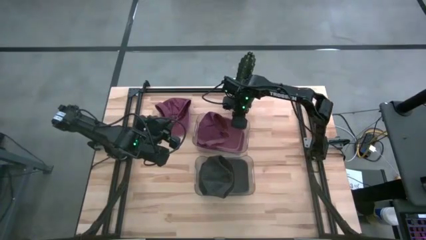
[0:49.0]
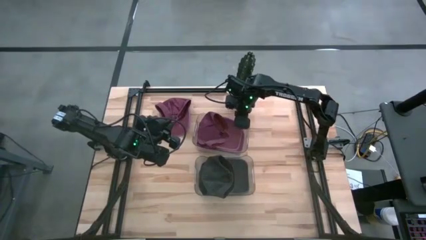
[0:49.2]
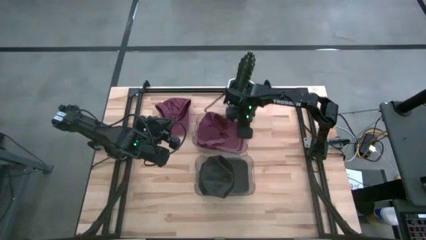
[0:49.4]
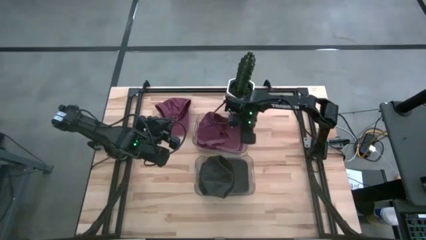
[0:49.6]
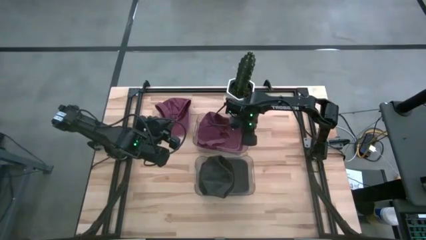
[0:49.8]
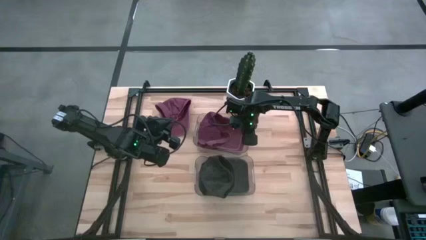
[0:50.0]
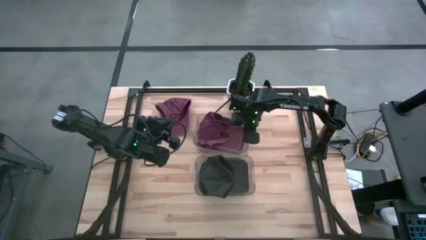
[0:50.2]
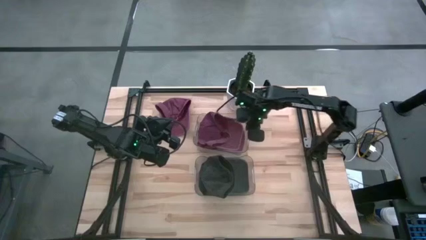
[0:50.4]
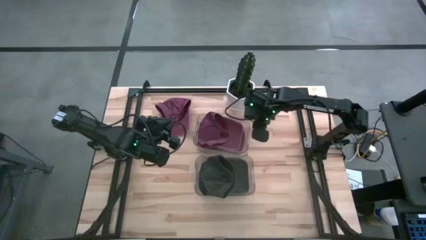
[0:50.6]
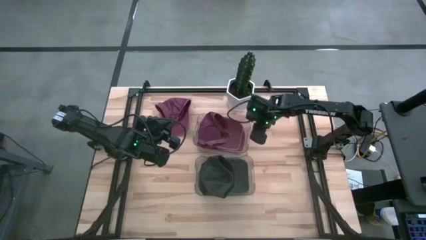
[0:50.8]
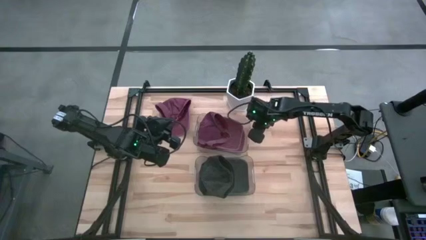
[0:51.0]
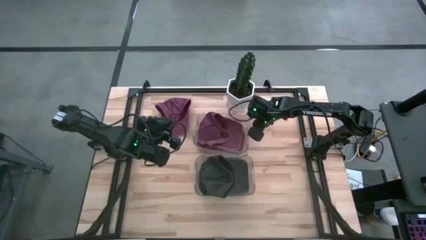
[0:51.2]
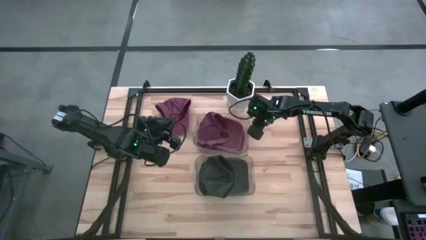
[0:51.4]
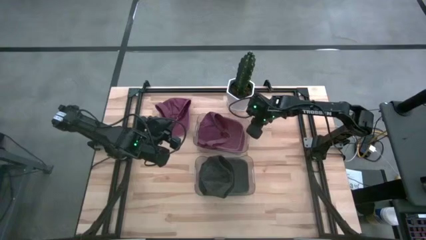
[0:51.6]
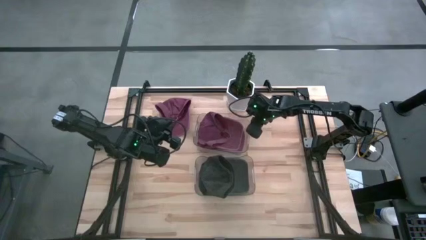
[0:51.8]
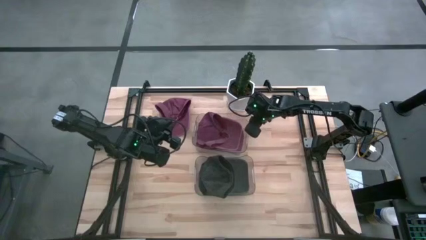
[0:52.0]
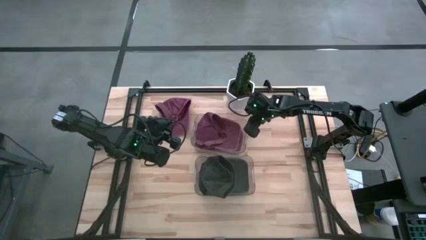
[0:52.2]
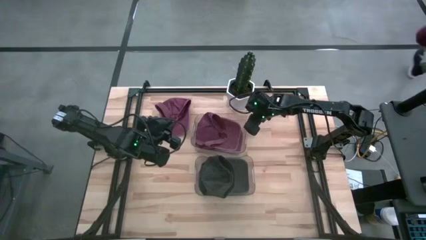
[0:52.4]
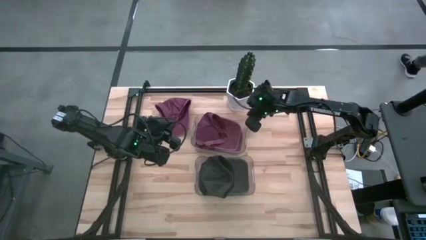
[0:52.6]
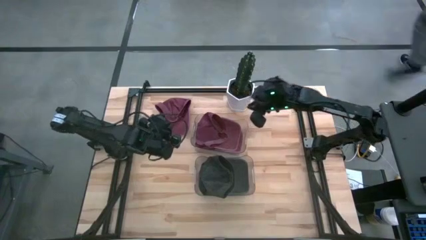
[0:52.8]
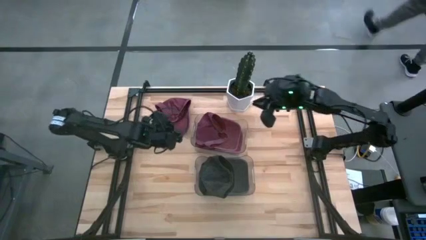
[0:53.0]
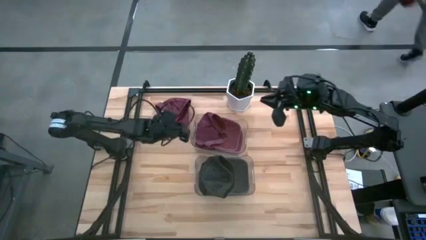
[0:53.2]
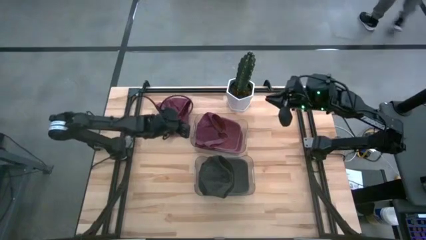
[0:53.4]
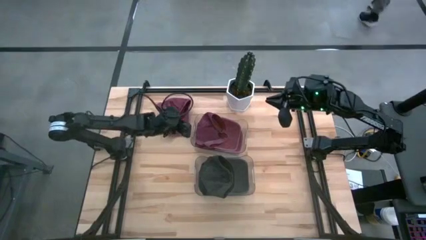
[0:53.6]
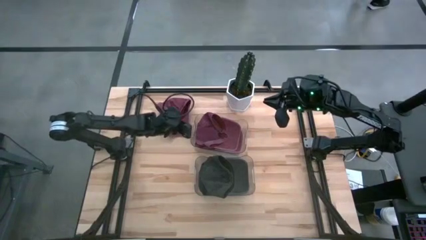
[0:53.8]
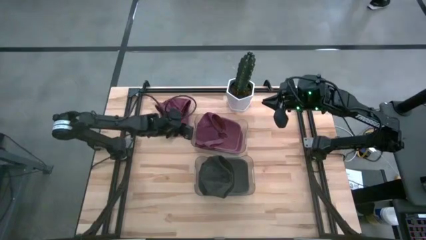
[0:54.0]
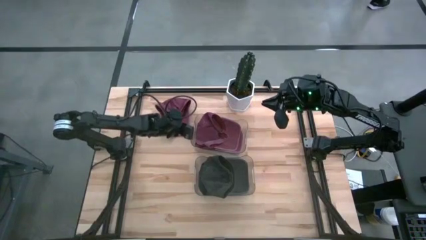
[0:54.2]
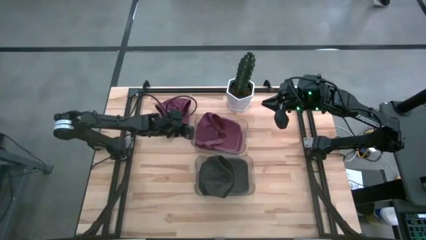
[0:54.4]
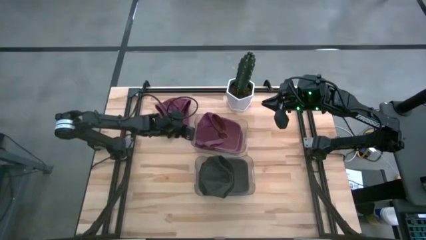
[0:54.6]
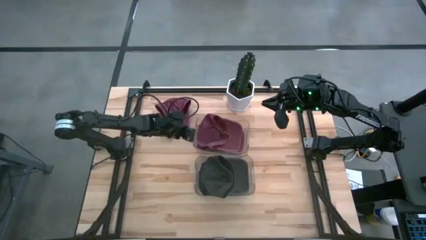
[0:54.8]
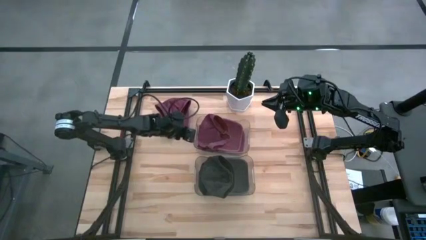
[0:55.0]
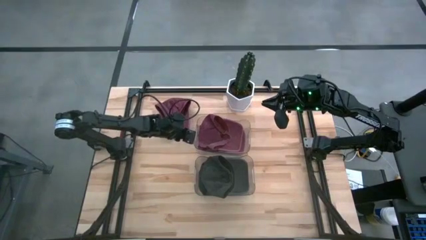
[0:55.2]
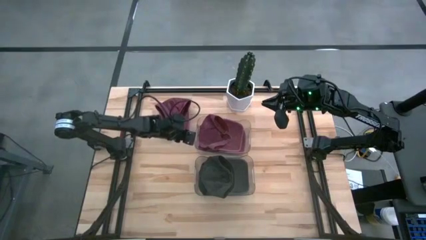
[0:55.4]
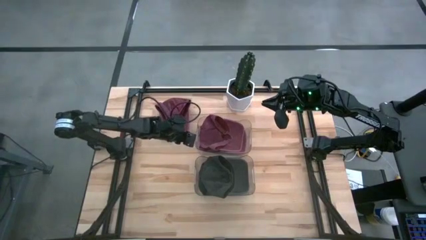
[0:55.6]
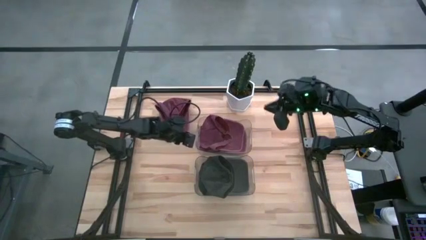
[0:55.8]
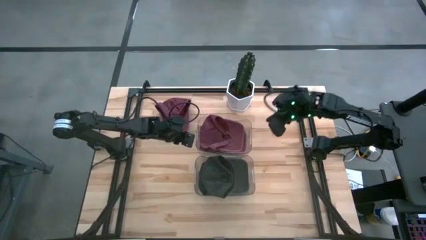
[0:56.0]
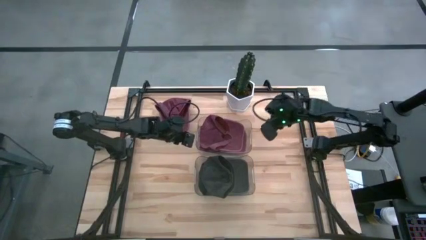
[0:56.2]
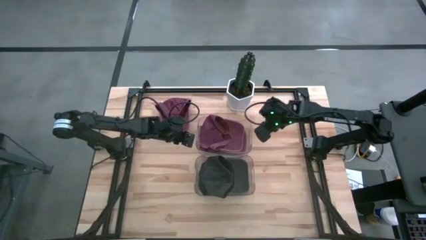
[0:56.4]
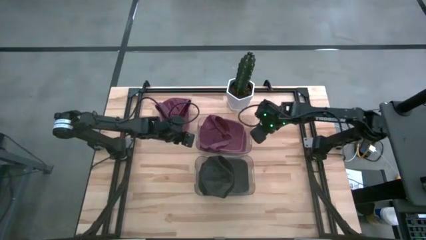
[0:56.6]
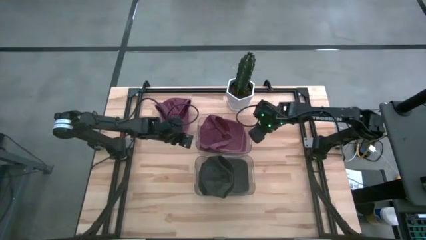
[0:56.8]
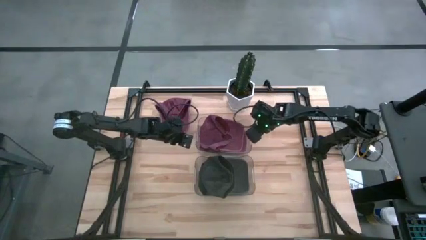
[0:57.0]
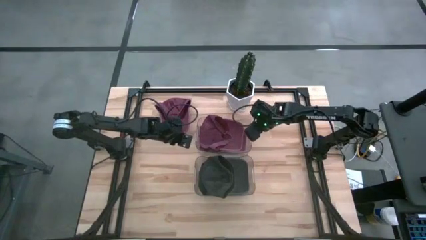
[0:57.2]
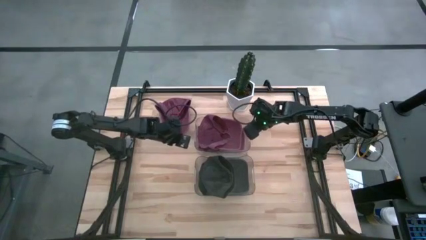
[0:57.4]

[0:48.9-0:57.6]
Task: Pick & Place hat
Adjust the top transparent bin

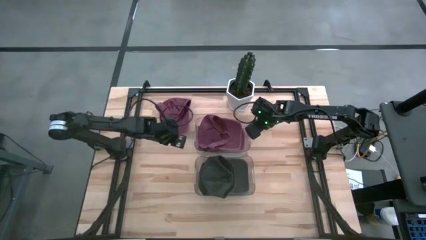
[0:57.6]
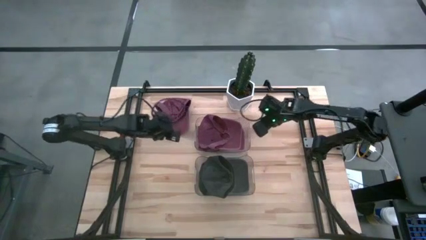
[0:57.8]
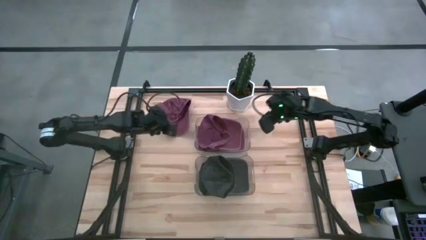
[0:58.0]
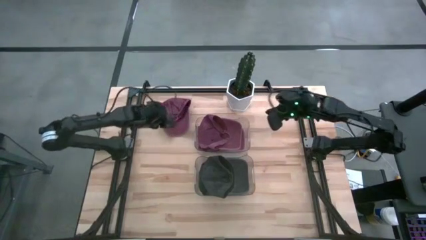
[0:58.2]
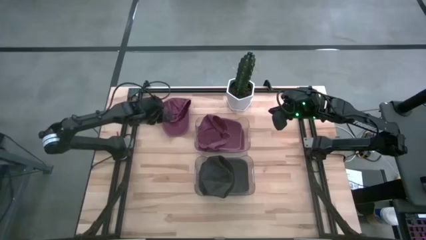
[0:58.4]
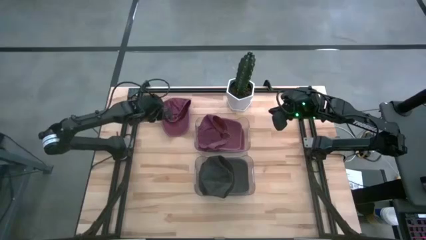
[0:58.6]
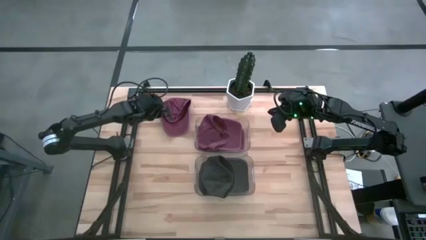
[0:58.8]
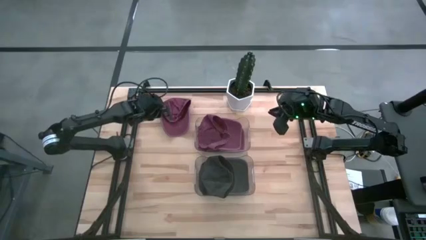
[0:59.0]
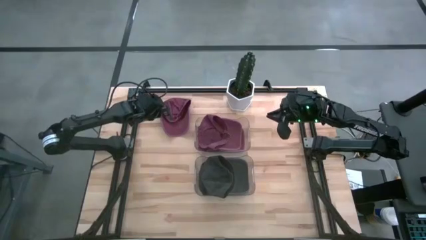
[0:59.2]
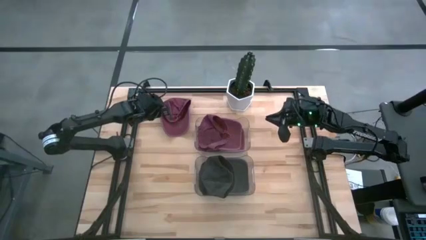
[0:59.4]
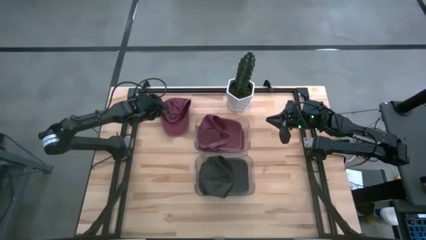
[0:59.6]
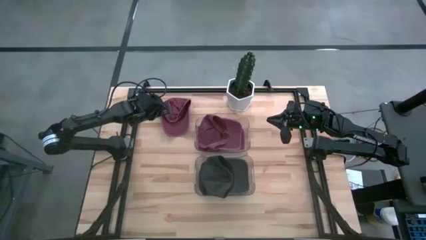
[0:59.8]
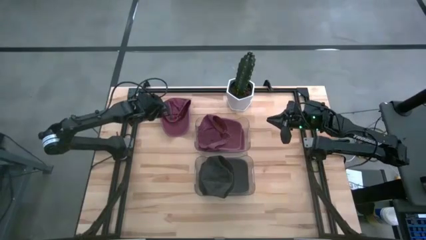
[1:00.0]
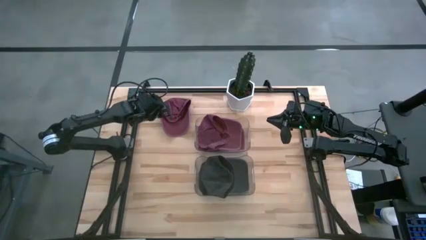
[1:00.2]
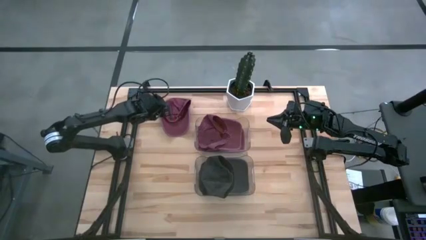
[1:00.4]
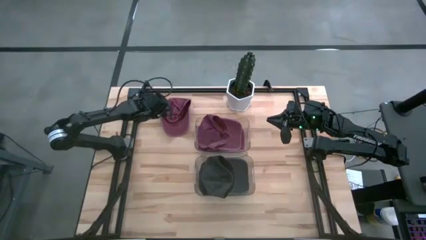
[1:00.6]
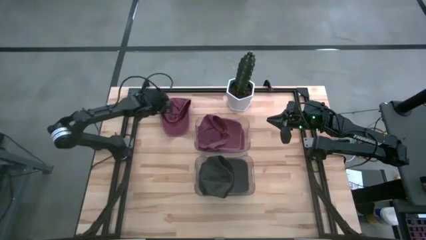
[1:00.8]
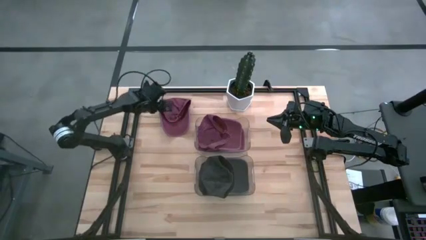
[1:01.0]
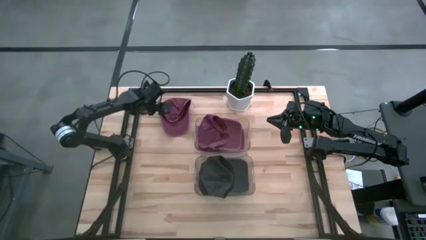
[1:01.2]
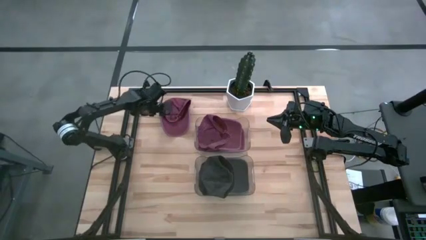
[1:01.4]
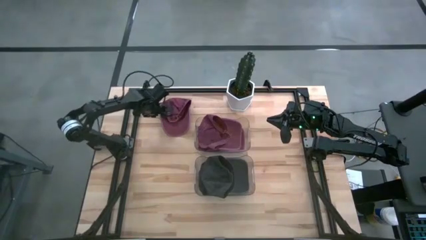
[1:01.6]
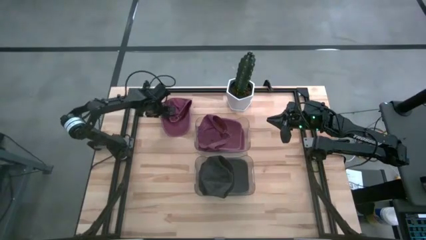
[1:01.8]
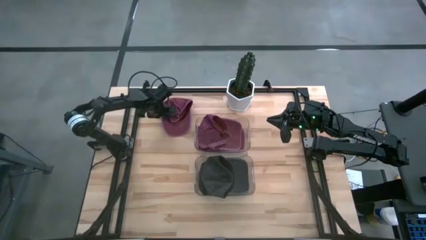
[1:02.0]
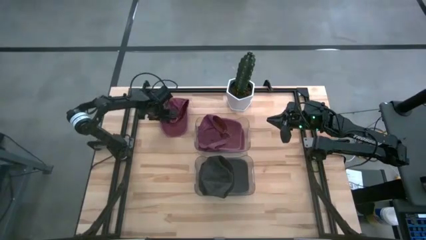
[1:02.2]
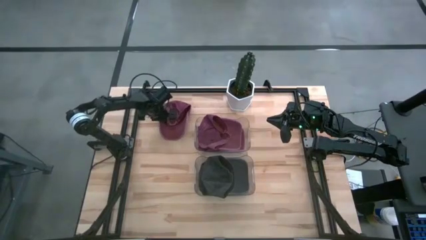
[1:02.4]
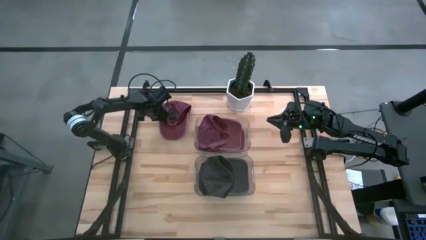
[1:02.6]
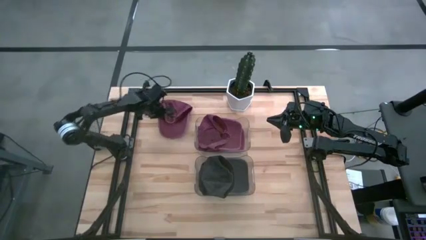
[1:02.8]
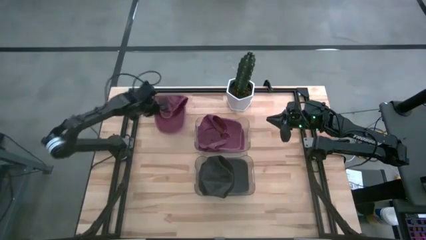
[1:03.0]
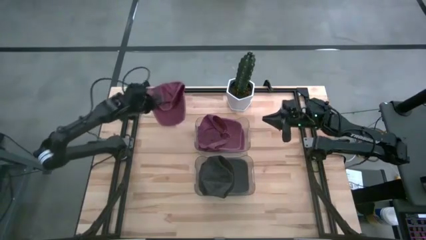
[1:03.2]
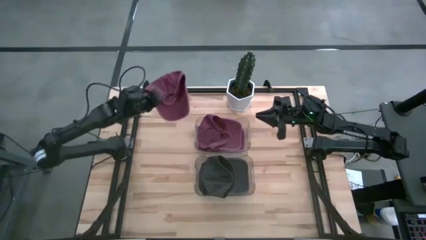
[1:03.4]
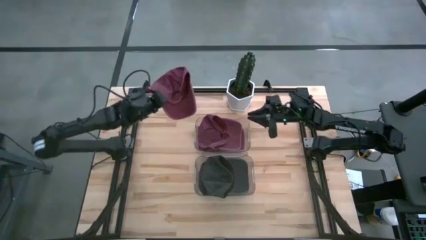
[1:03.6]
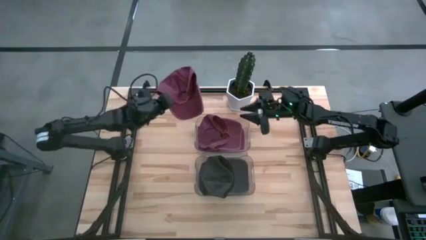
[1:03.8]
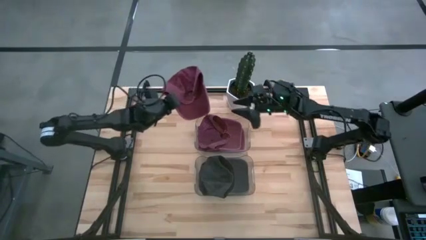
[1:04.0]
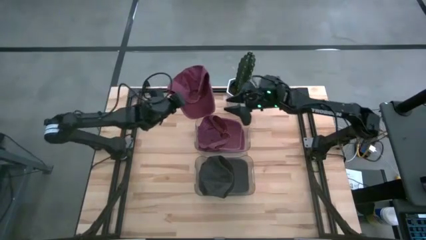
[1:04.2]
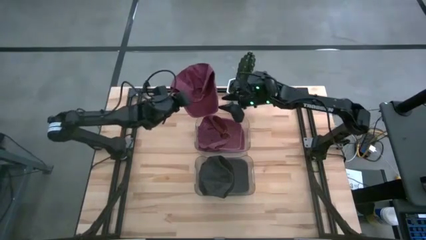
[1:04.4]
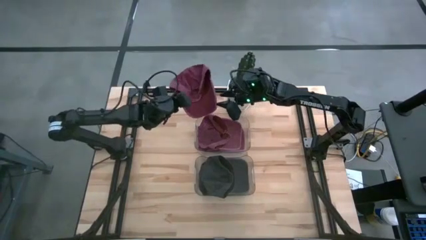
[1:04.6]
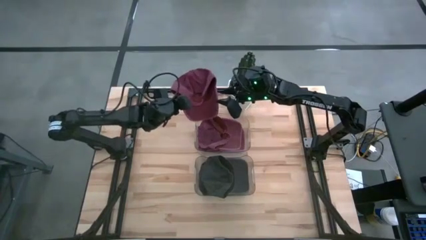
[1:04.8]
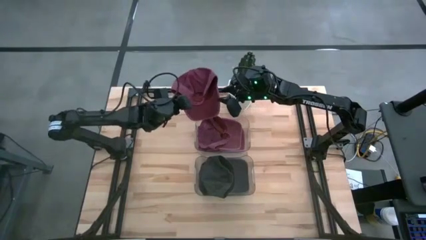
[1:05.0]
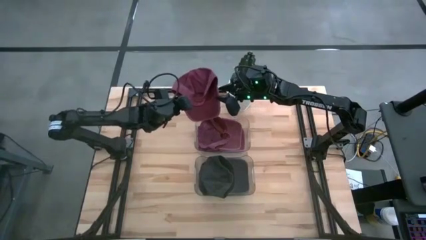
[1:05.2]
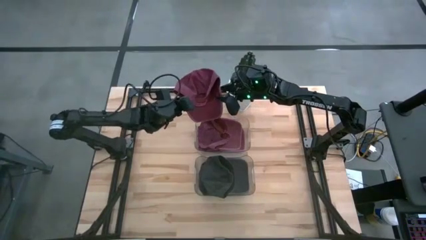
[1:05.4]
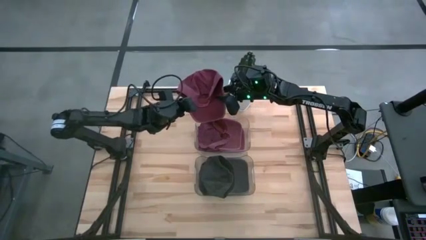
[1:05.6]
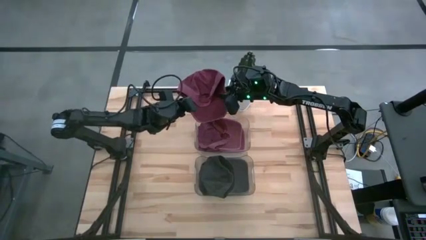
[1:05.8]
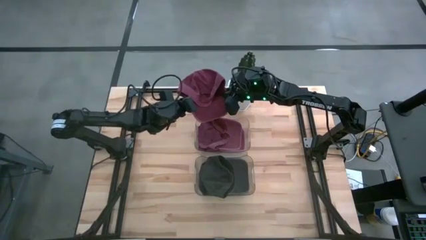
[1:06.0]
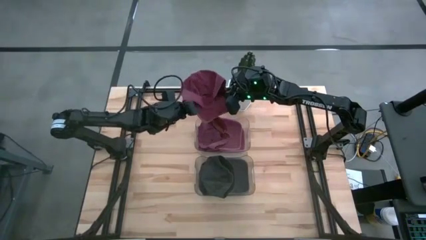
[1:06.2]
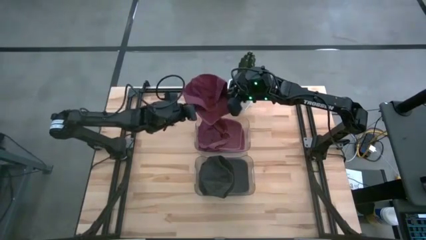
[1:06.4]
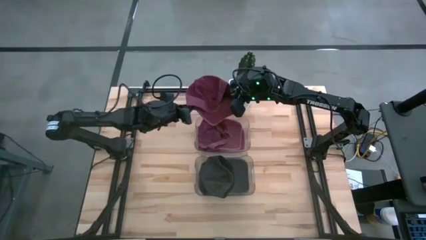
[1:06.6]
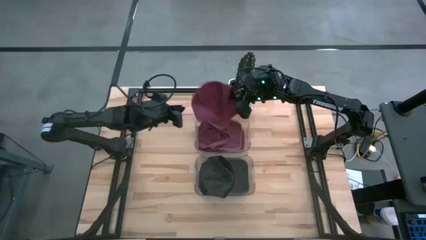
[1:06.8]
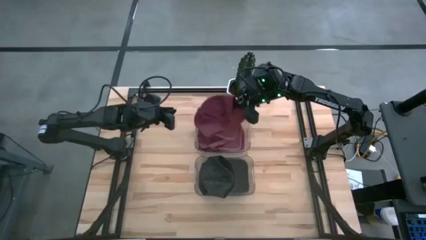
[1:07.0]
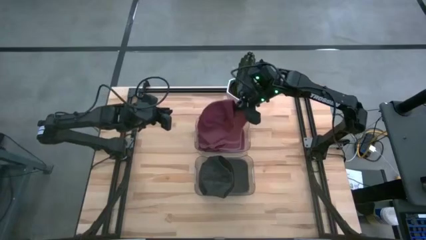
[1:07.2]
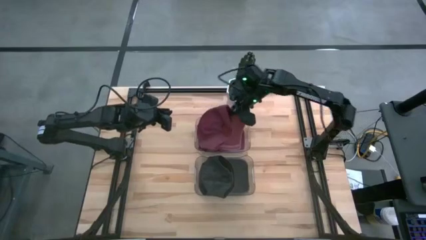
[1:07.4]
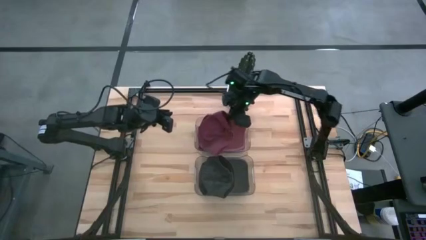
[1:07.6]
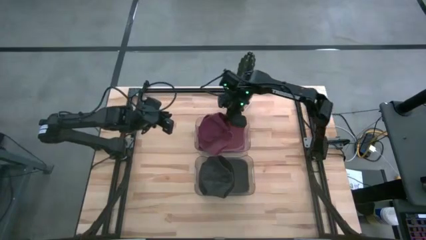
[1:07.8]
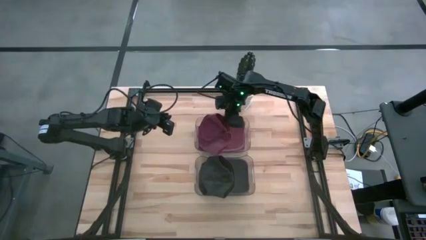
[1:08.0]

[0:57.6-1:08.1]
Put the red cap into the top transparent bin
